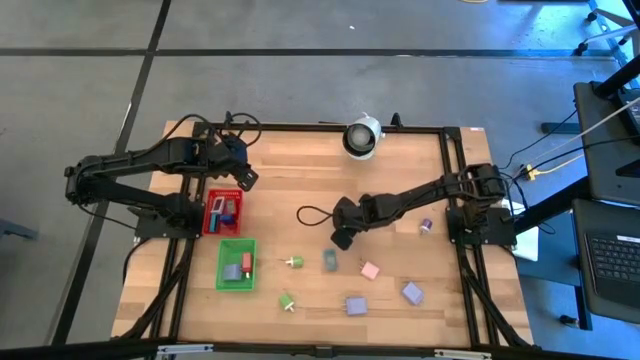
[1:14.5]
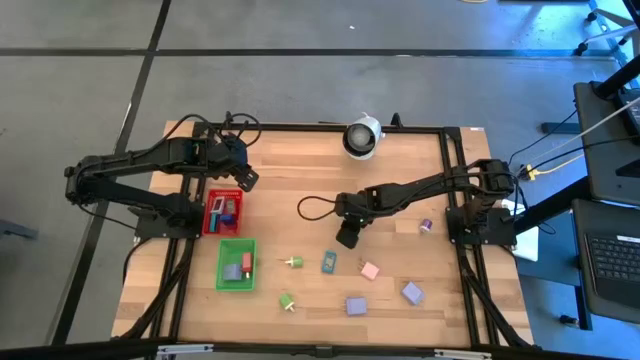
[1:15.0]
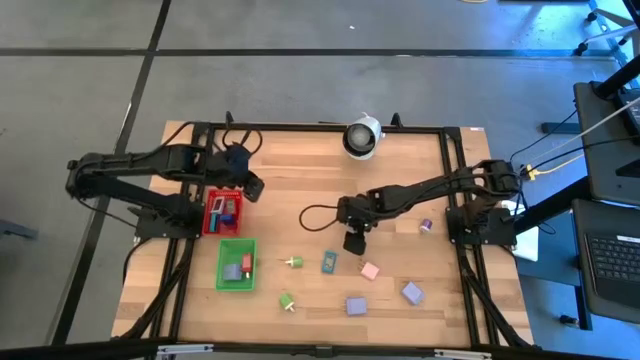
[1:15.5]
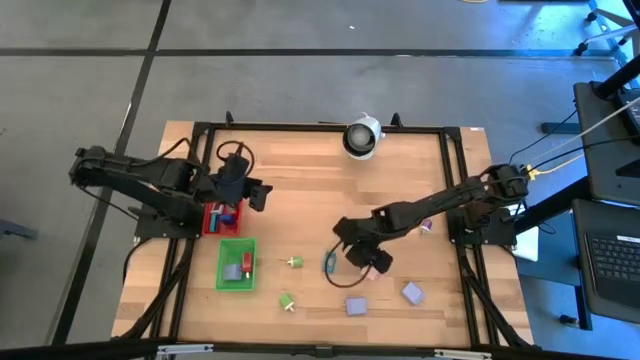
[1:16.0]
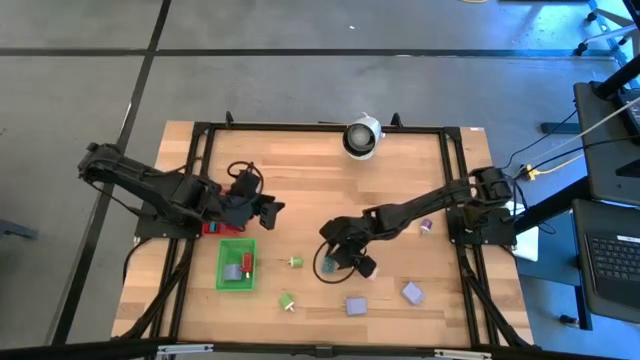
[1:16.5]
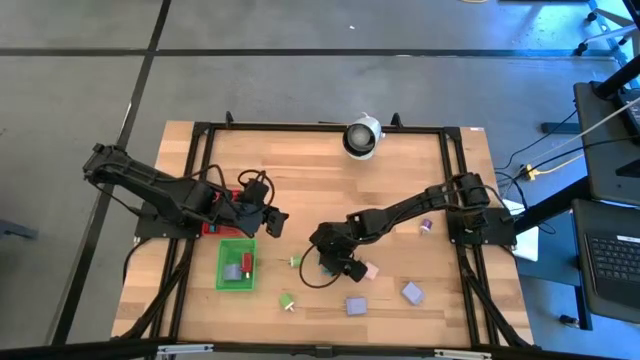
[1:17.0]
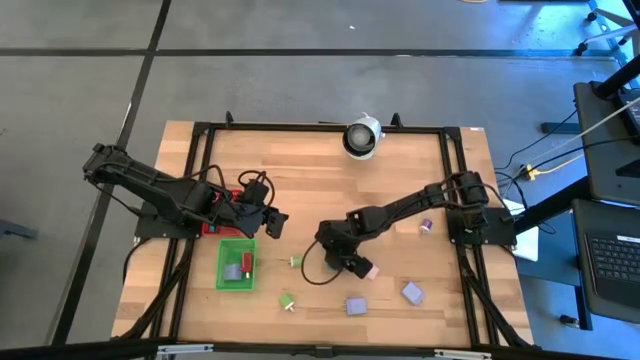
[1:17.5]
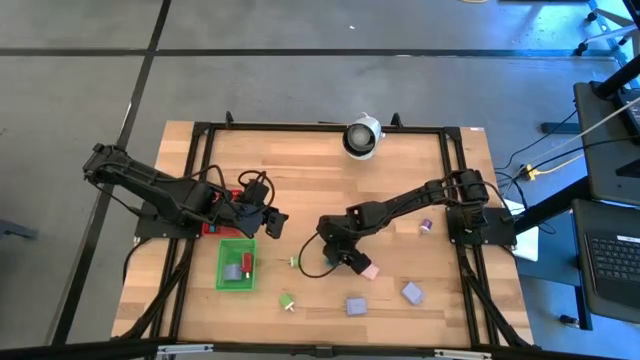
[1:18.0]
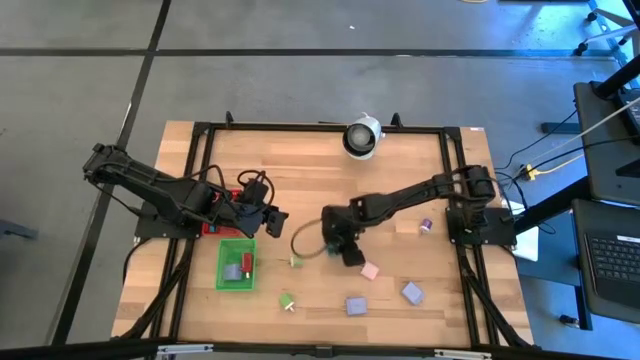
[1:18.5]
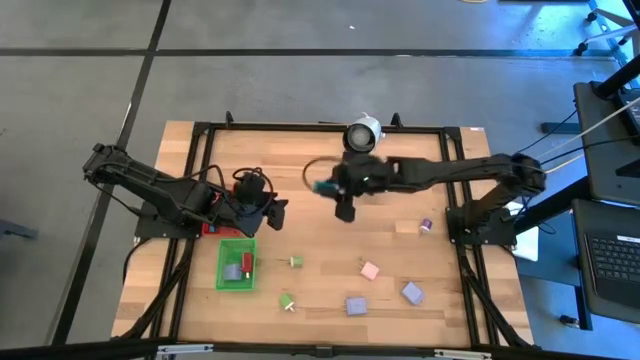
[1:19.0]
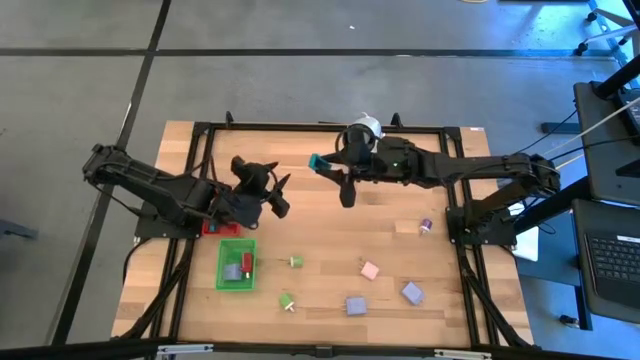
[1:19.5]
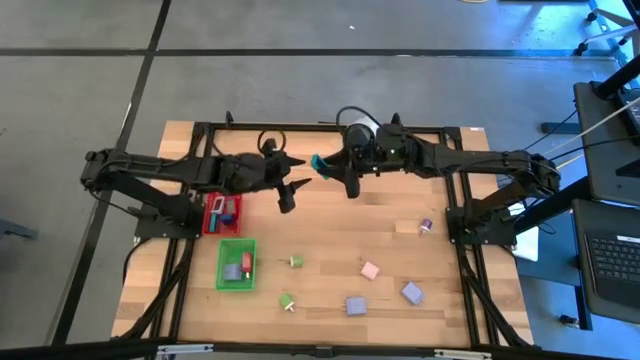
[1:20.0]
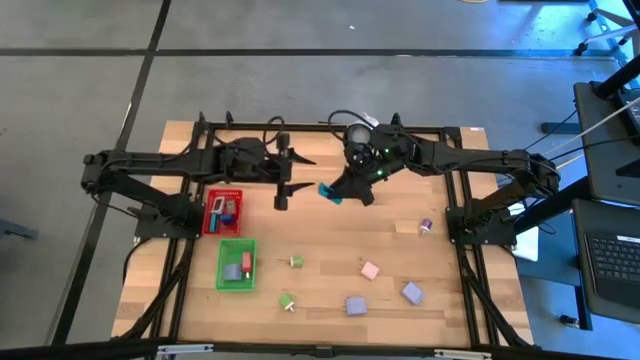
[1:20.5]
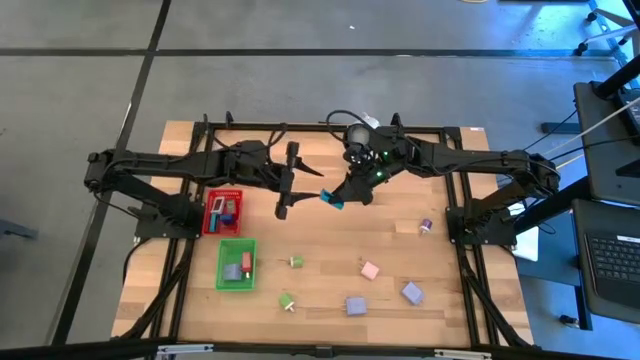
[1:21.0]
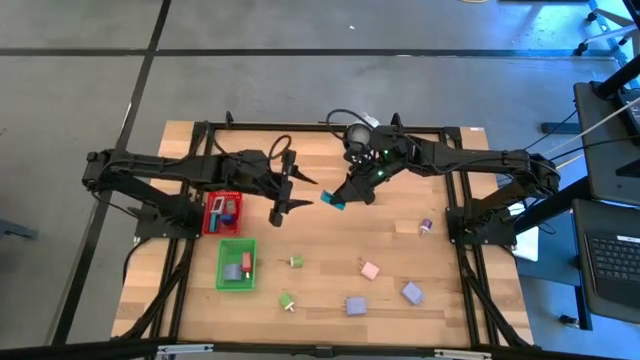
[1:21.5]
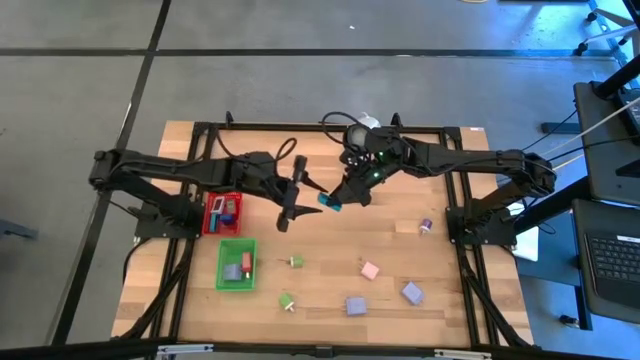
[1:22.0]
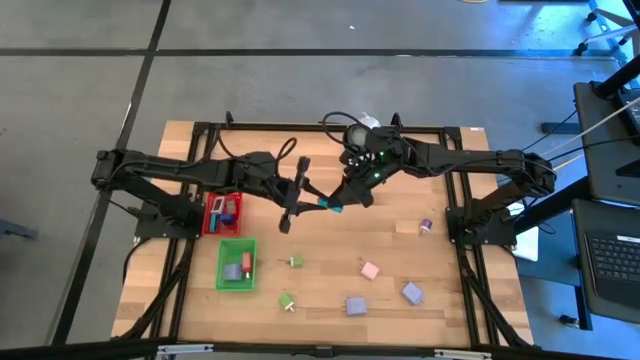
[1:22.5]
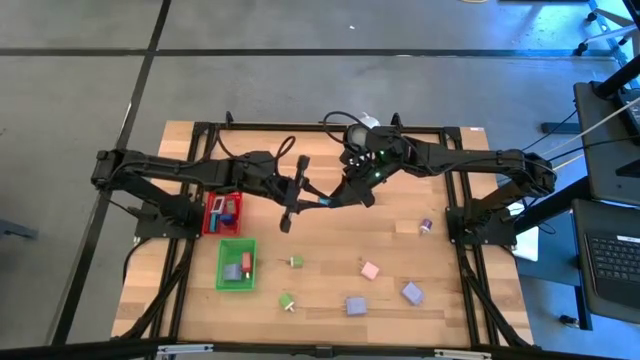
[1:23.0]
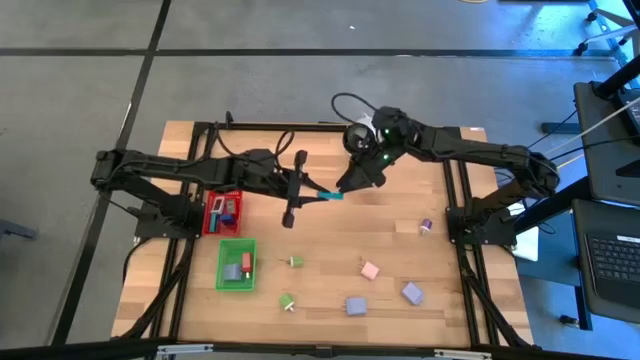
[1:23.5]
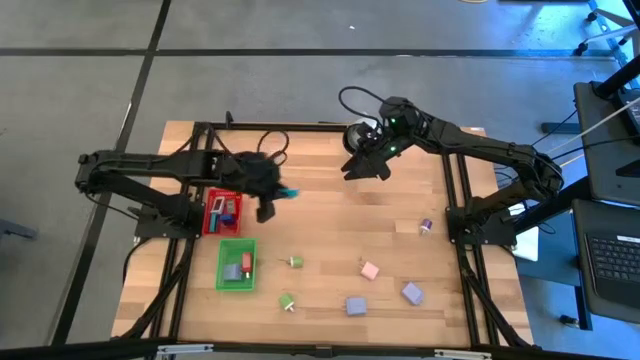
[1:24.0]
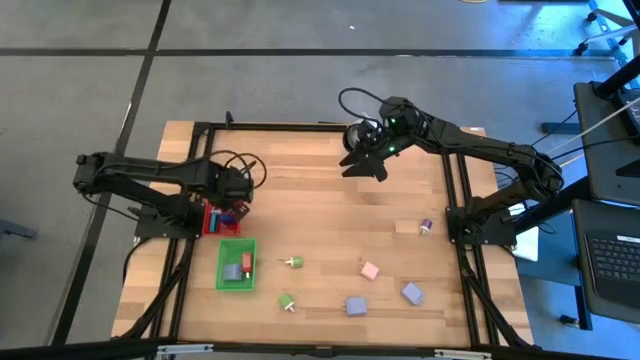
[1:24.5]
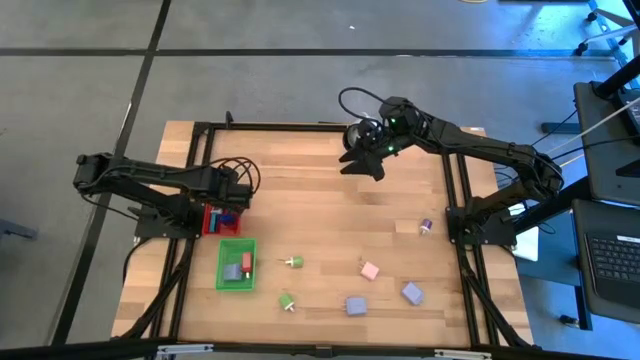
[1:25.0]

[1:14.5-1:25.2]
Task: Pick & Place Office items
Put the light blue digital timer into the red bin

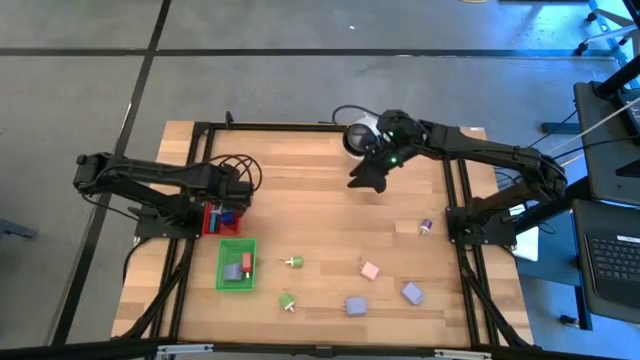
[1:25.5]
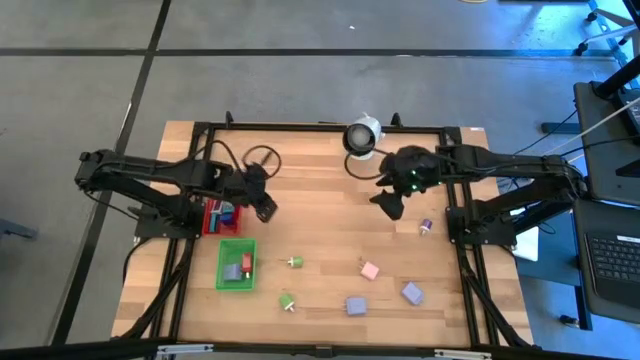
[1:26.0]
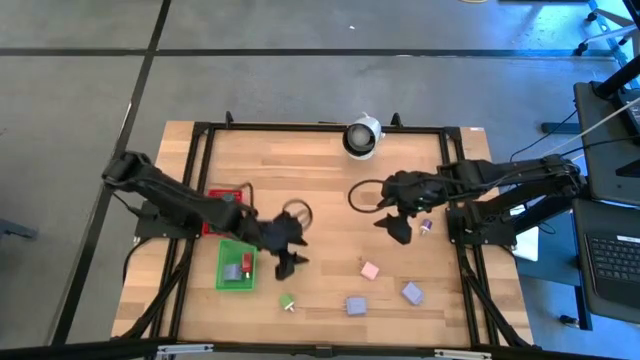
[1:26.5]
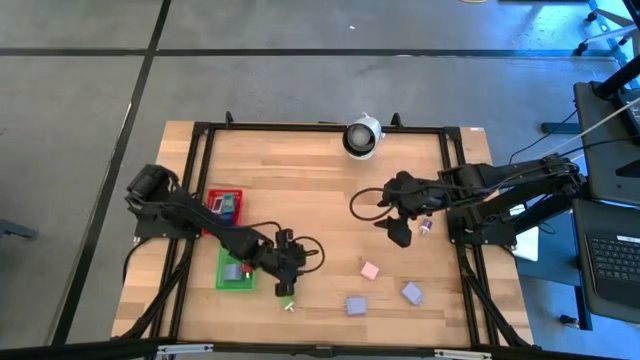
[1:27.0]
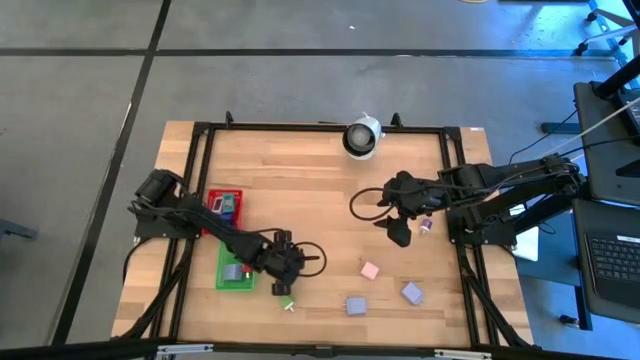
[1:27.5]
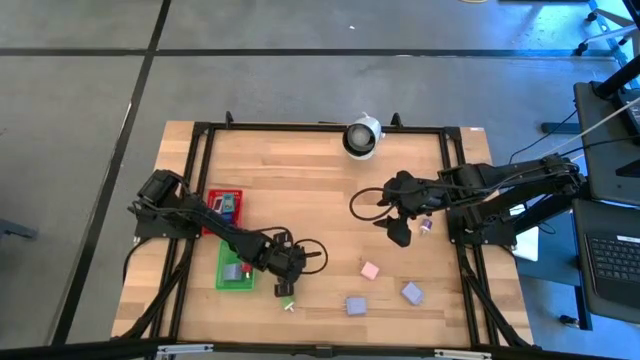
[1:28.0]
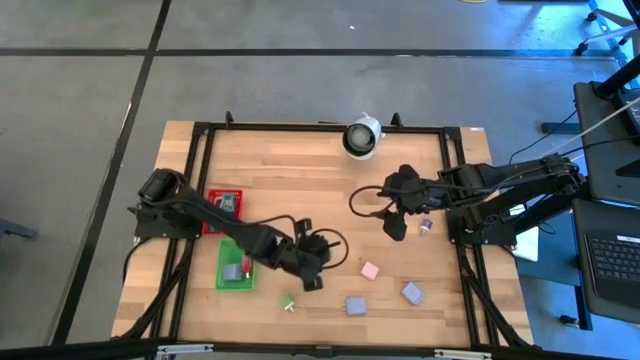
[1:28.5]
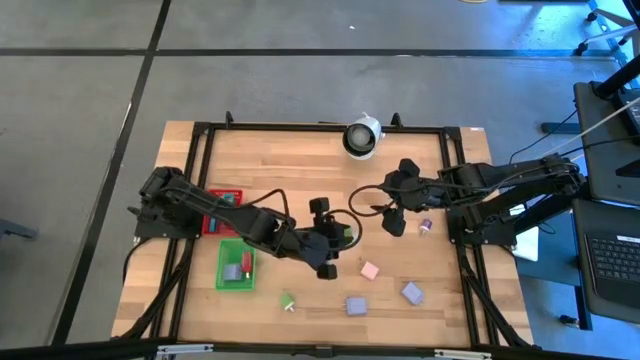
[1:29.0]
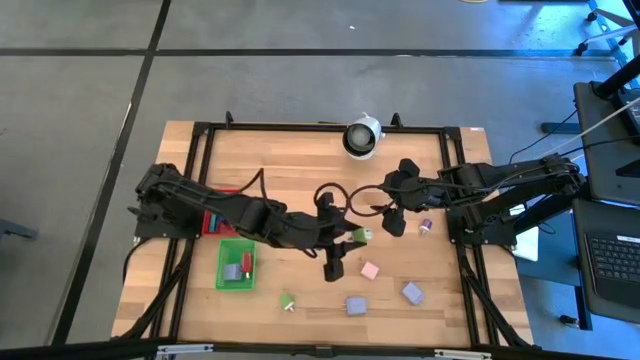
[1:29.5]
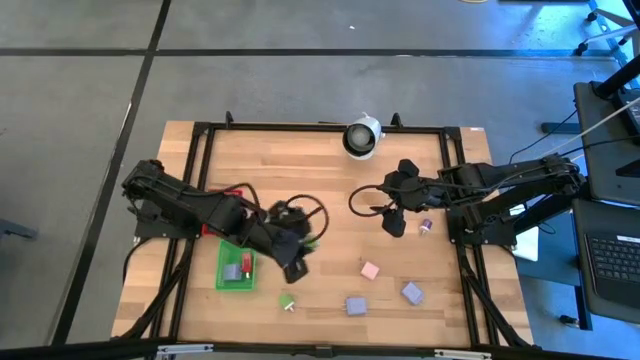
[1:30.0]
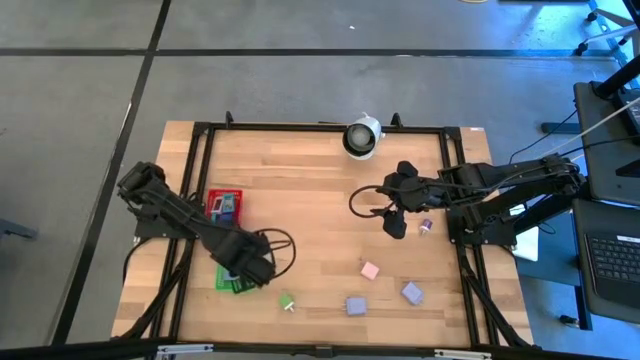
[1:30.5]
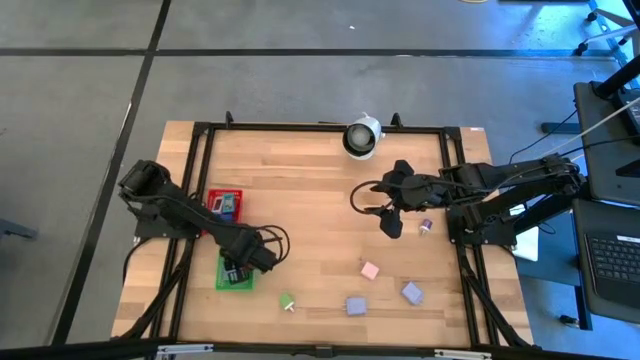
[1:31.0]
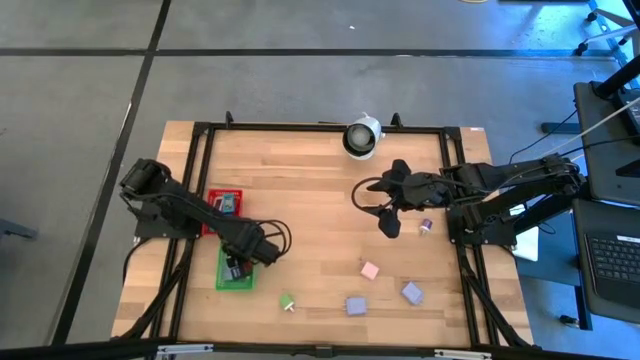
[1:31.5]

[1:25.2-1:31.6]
Put the top green charger adapter into the green bin

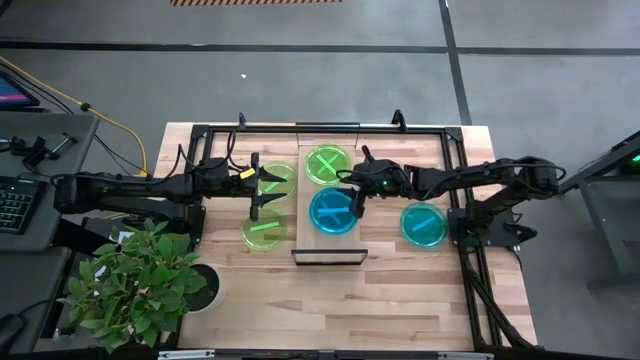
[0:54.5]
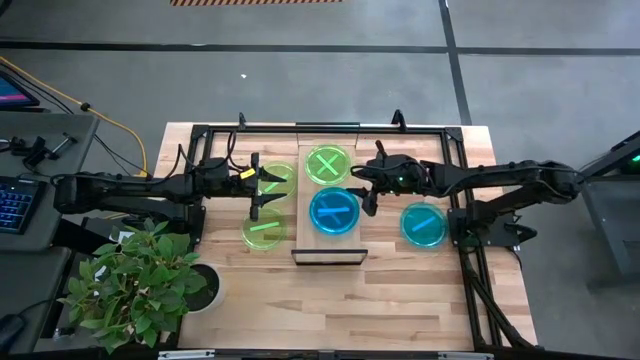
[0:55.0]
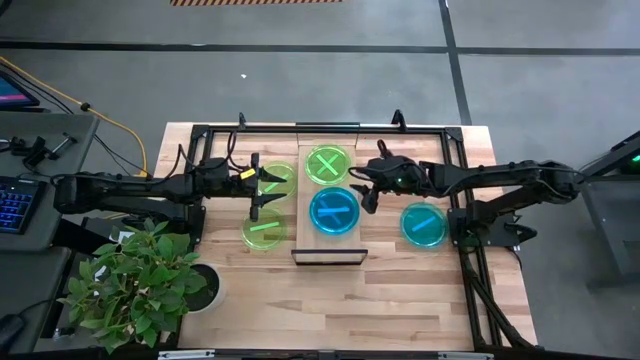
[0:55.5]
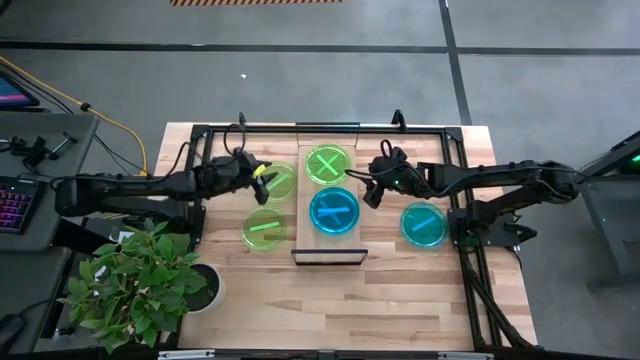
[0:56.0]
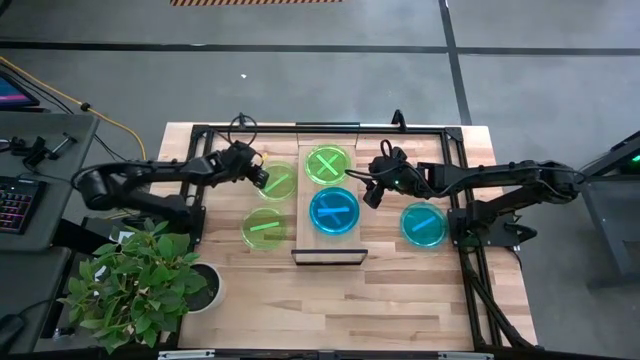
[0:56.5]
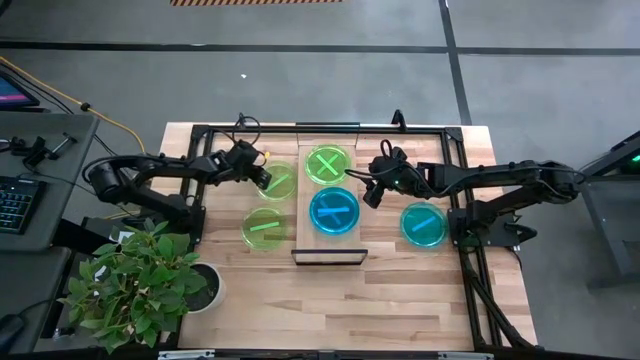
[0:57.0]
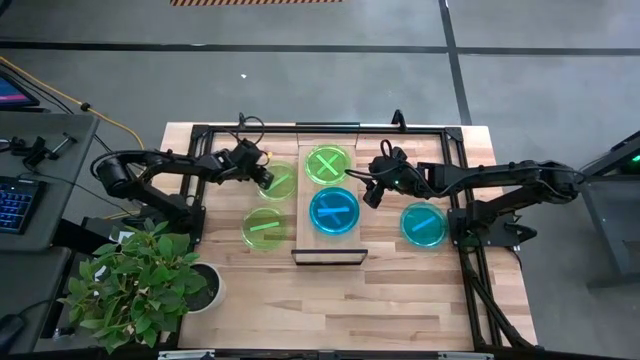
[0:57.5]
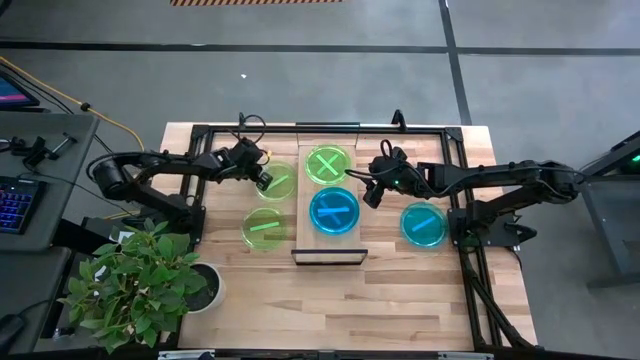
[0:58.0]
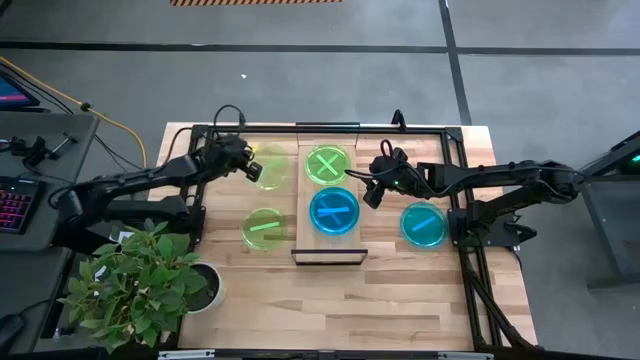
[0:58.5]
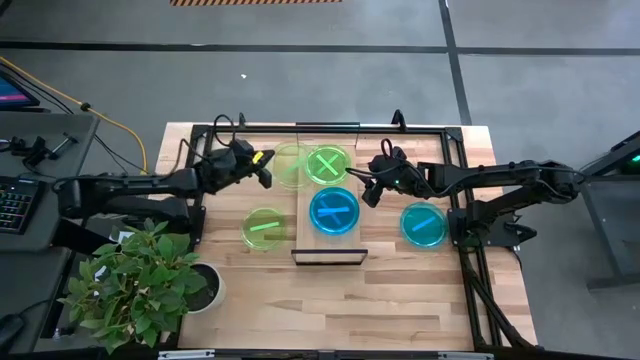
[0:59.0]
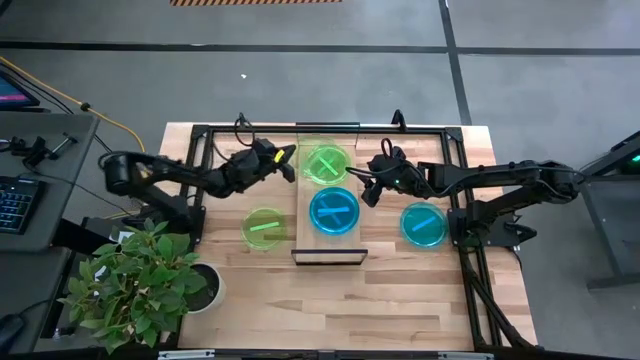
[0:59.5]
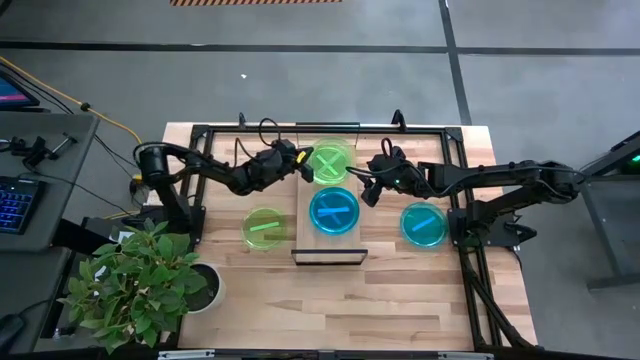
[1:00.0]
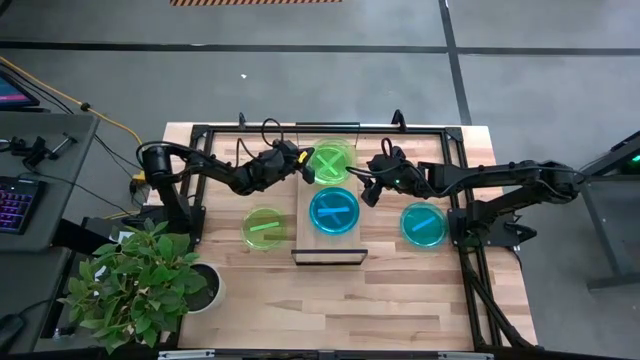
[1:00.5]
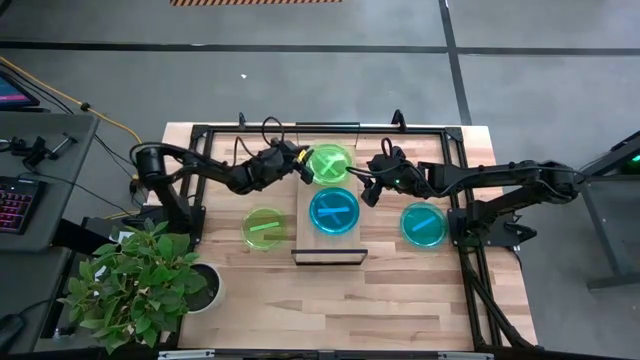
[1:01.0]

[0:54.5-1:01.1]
Task: Place and stack plates onto a shelf
Stack the top green plate on top of the green plates on the shelf
